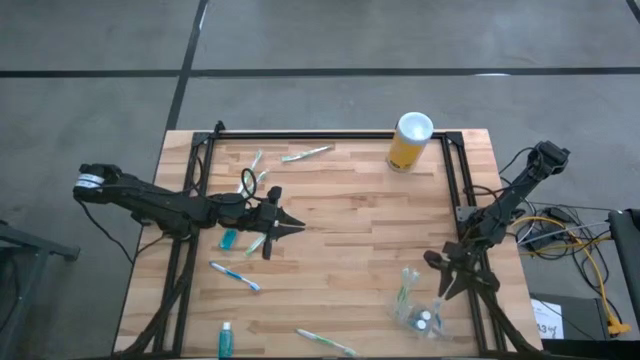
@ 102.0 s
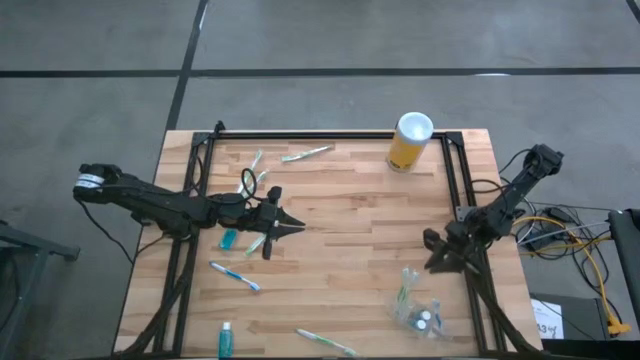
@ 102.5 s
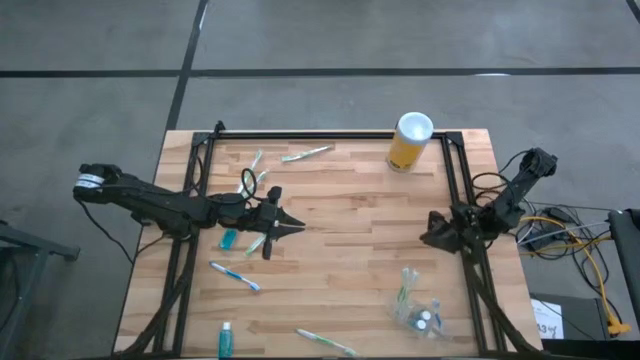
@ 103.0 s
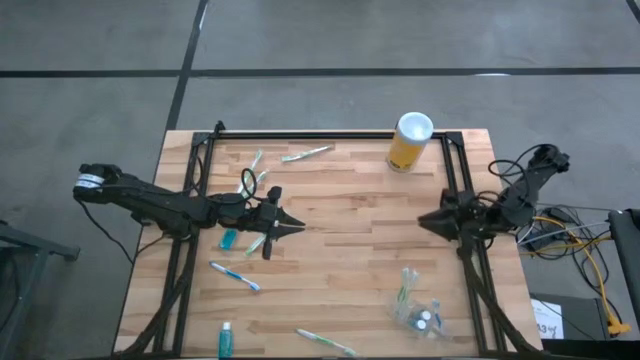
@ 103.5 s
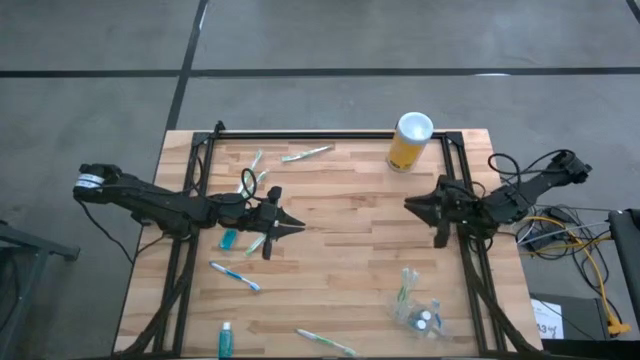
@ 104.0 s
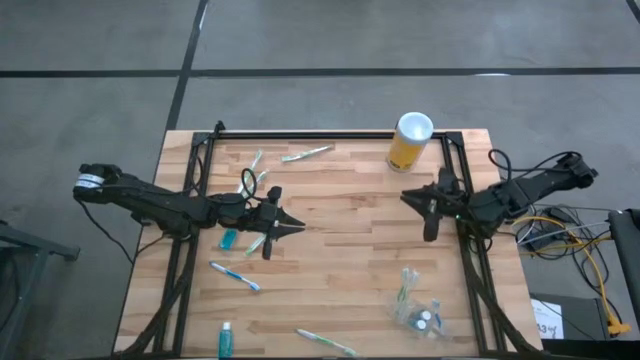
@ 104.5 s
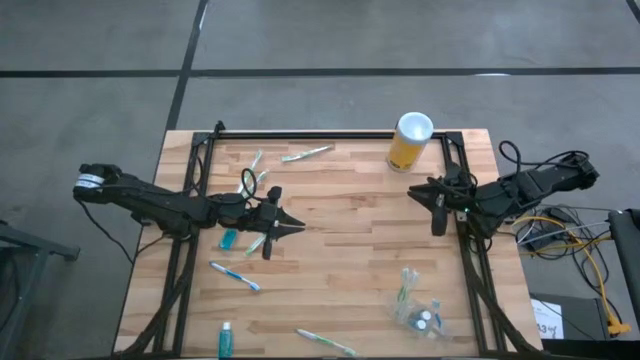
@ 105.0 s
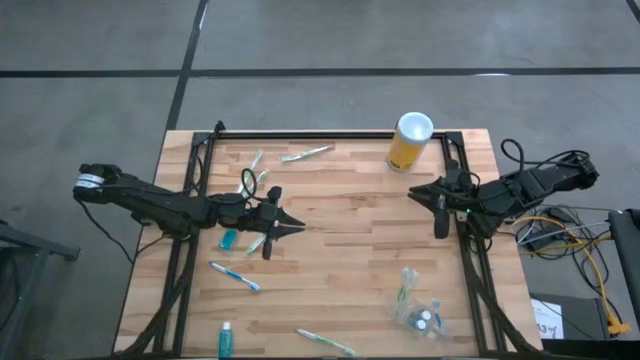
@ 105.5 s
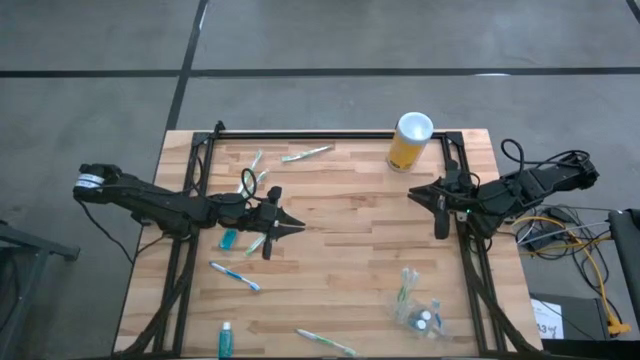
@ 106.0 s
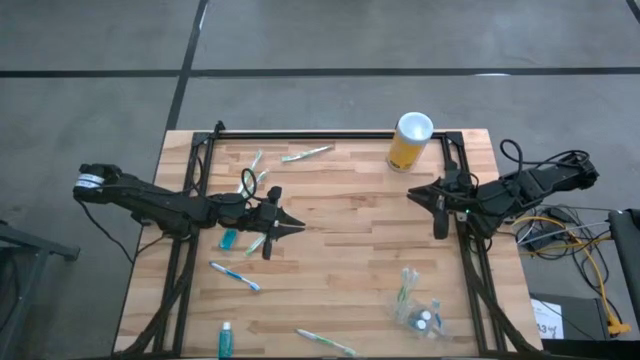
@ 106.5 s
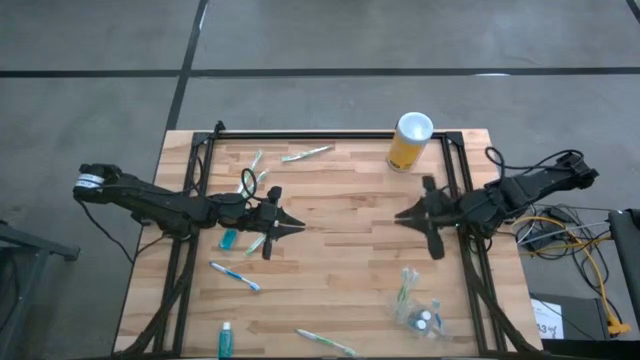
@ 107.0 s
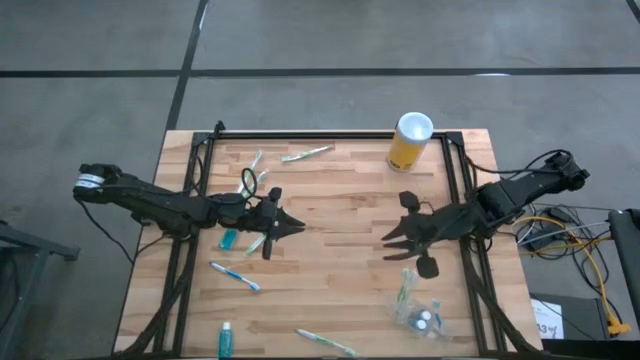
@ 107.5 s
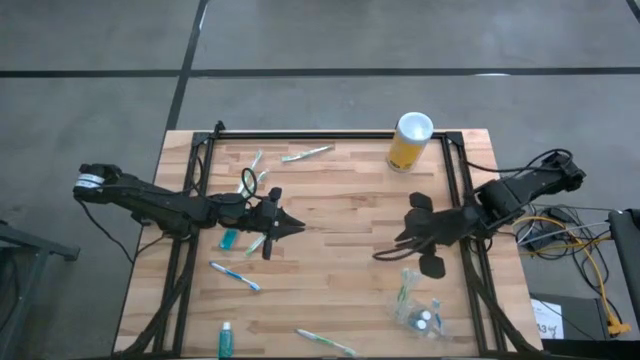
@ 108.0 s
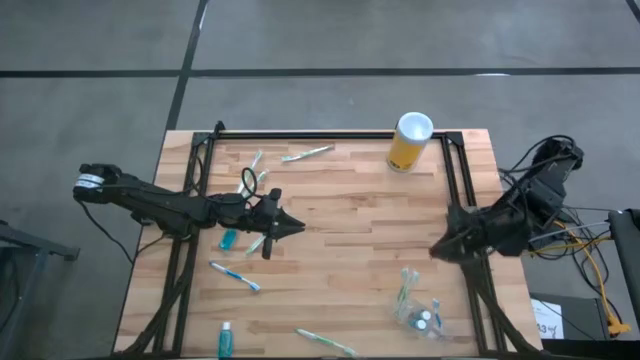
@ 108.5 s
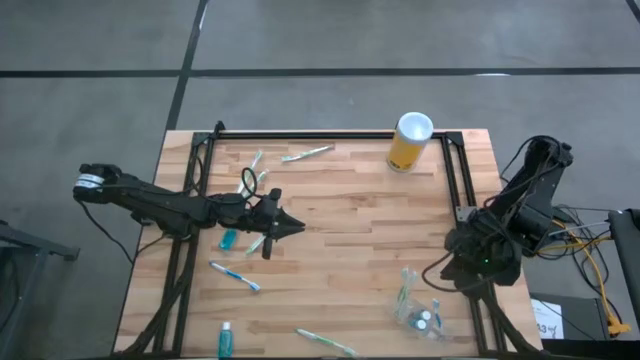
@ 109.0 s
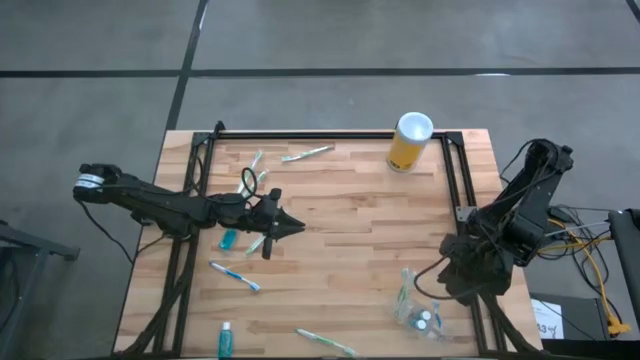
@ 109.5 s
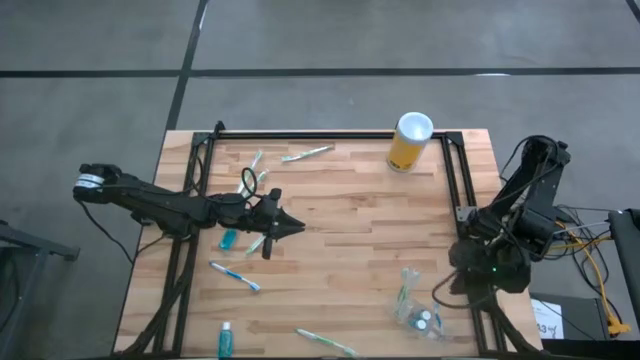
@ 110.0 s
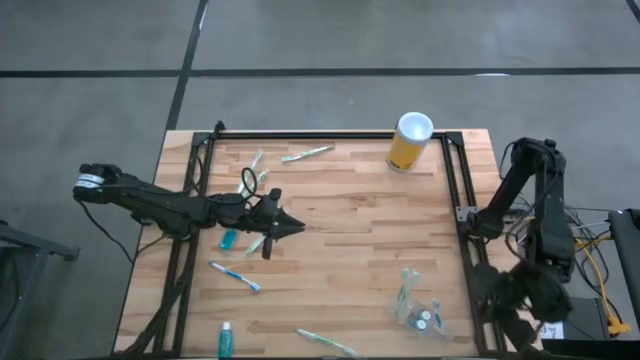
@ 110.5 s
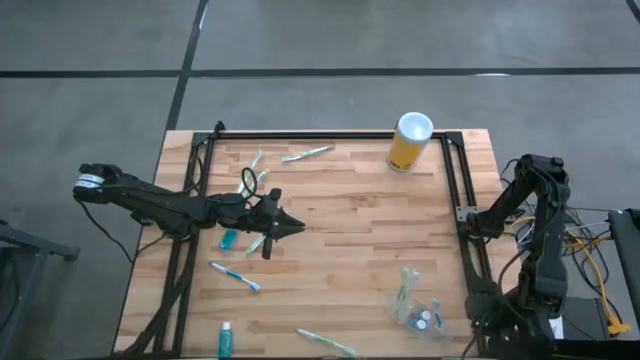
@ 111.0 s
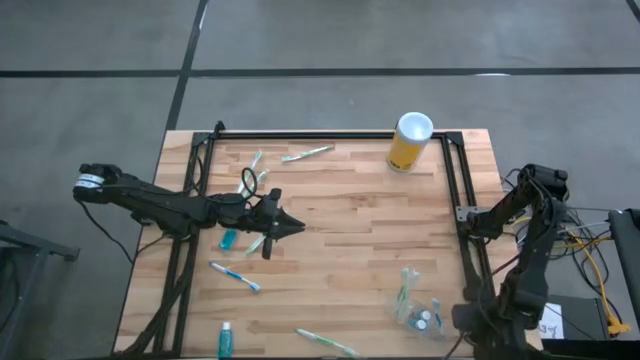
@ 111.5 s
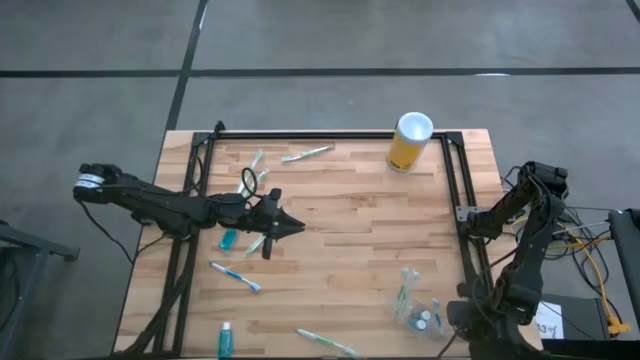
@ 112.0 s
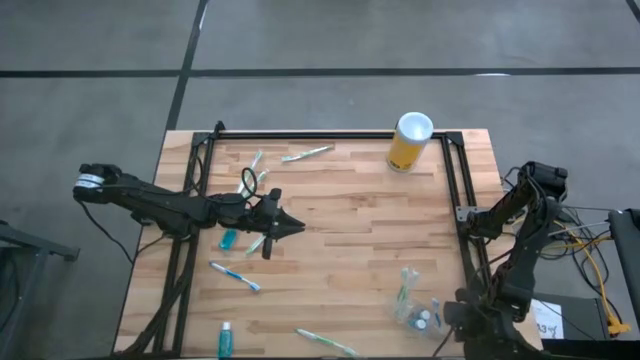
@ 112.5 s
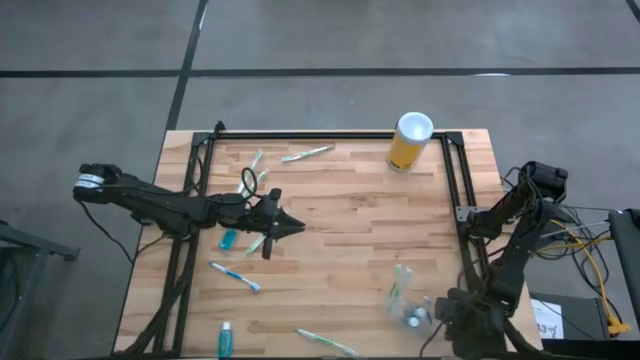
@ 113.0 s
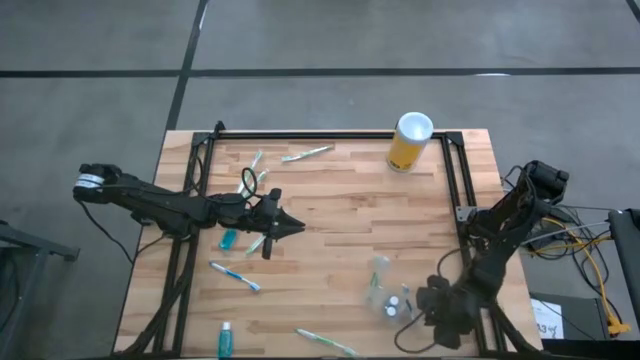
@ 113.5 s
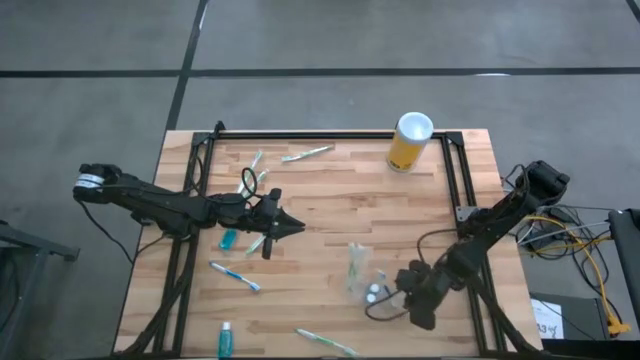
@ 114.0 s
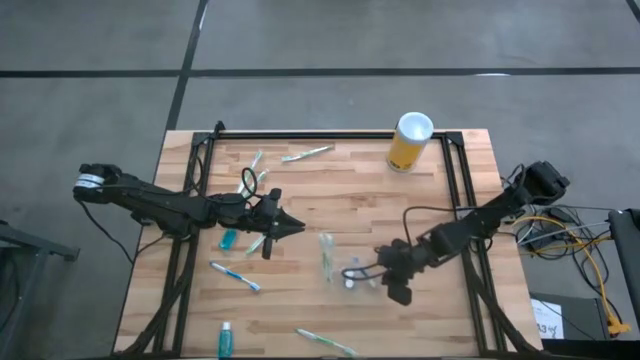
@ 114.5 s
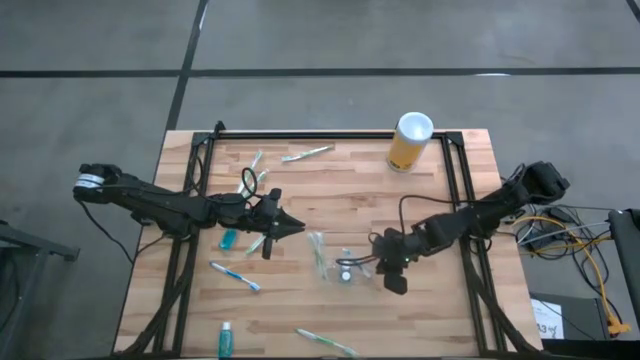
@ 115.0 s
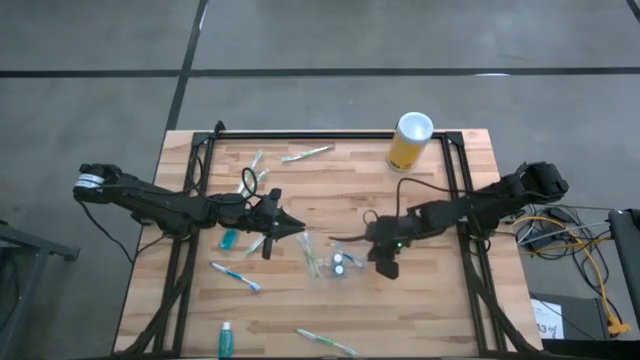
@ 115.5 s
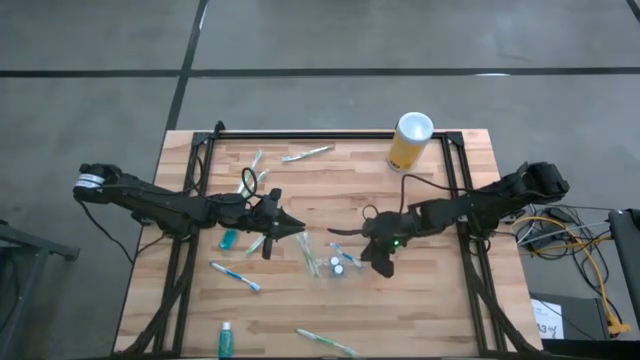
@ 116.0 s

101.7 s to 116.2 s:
Task: Pick & Place toothbrushing station
Move the transparent organizer to the center of the table

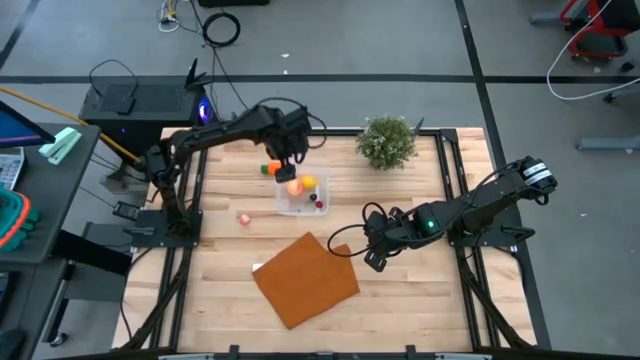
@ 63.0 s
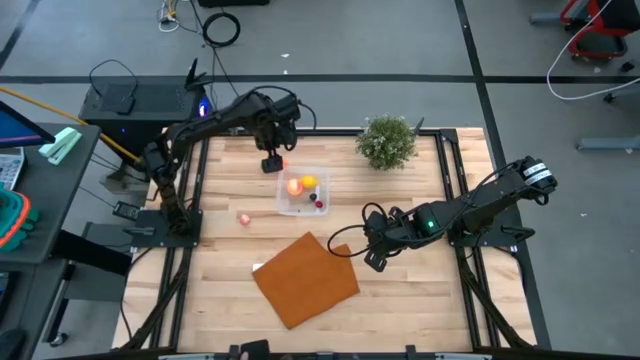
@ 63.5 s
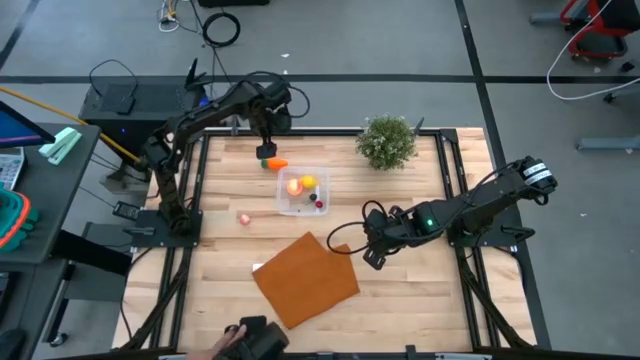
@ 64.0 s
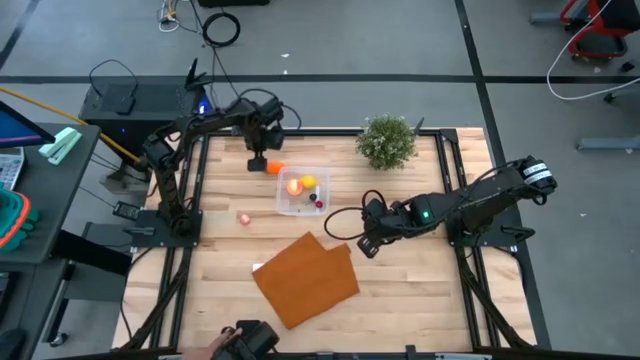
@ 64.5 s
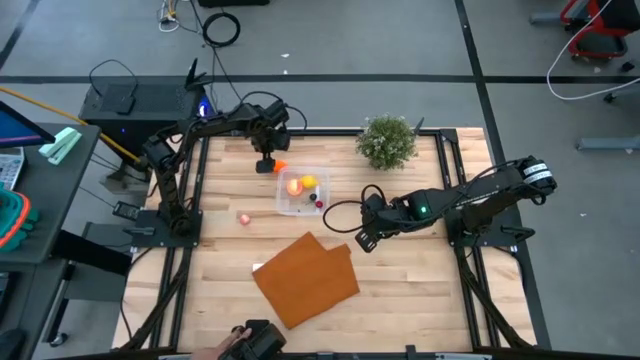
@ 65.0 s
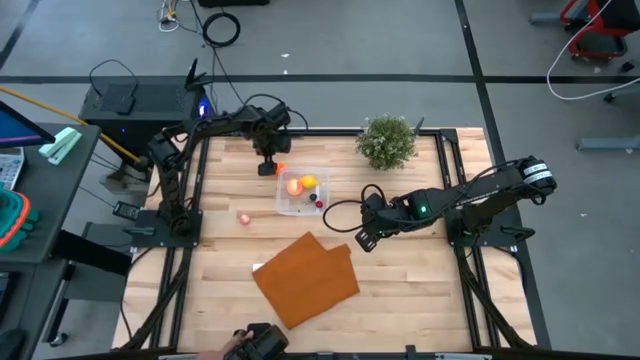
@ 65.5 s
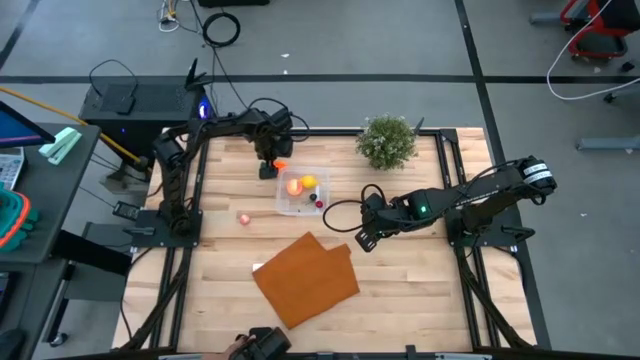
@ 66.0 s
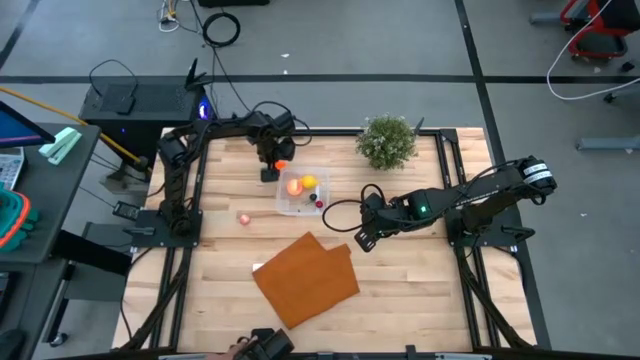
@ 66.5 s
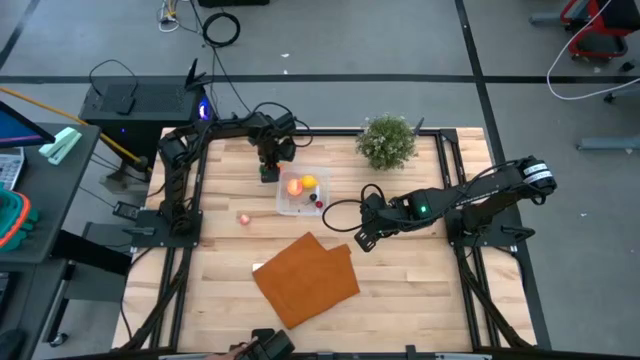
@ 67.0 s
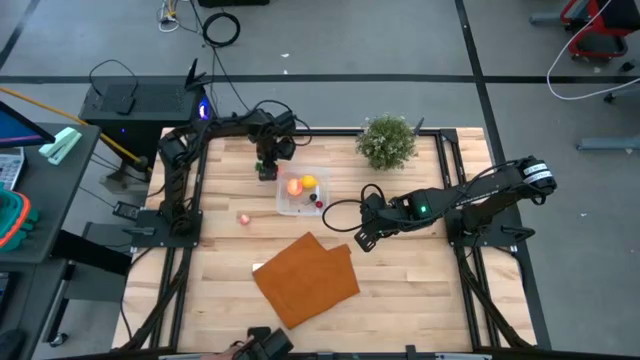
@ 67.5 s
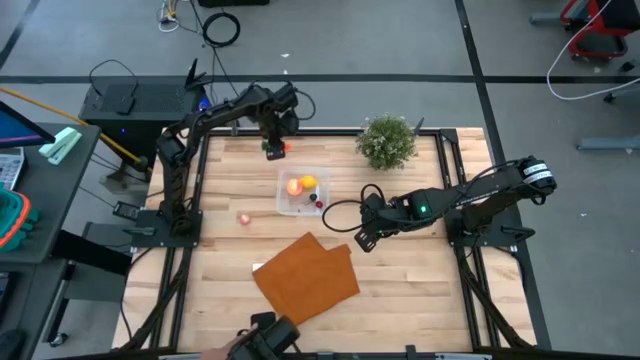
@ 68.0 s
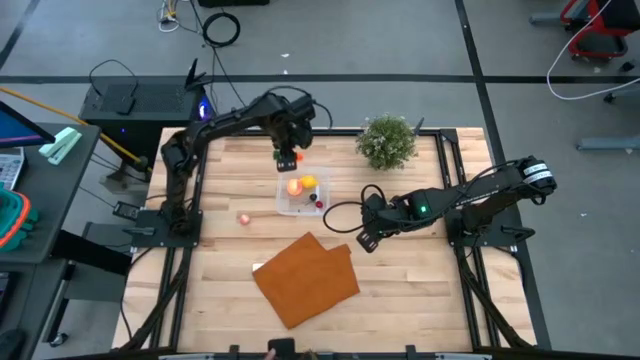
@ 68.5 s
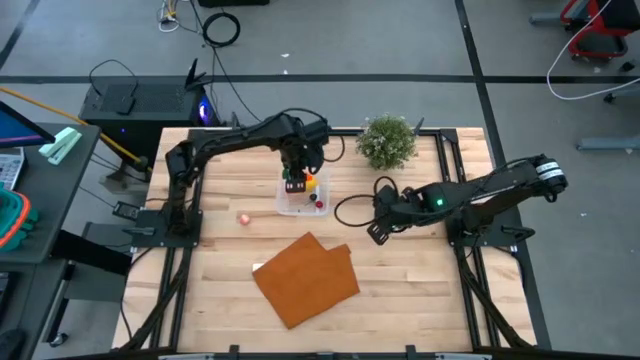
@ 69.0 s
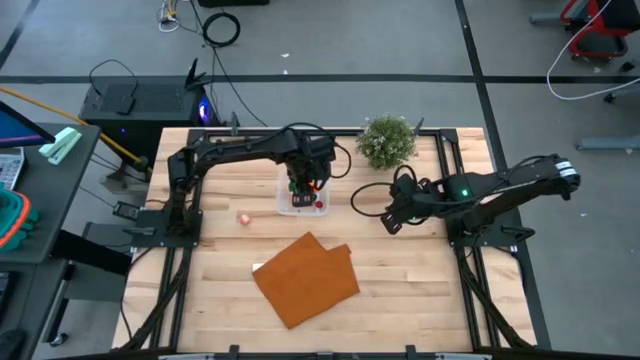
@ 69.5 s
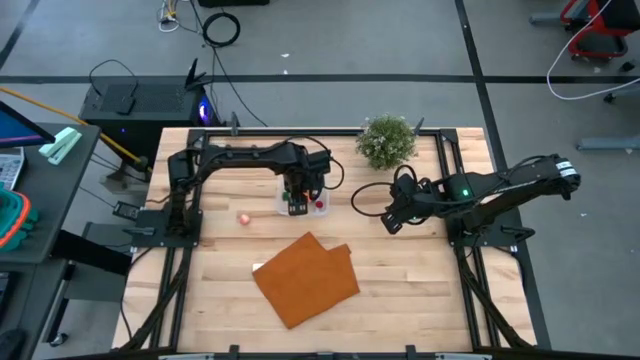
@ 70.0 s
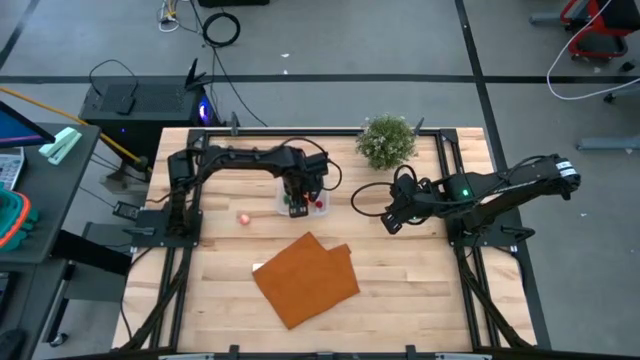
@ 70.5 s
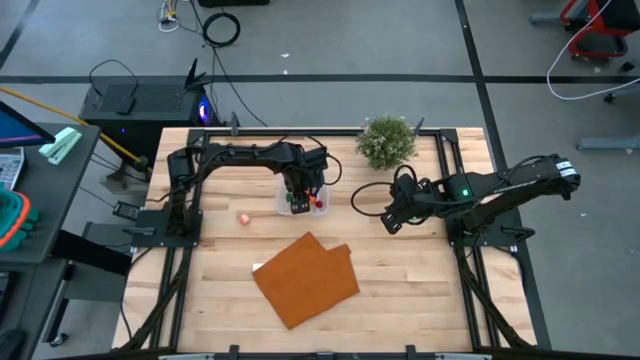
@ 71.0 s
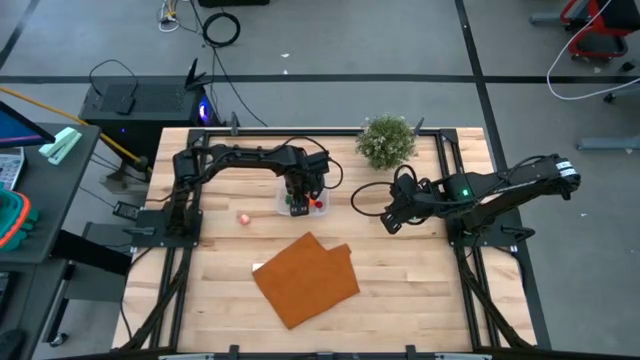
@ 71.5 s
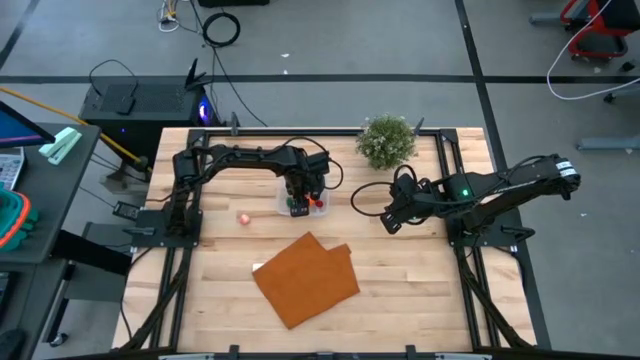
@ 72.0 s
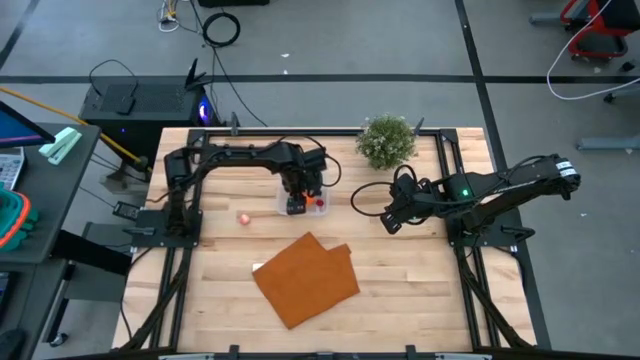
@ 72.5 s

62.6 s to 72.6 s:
Task: Pick and placing Produce into tupperware
Put the orange carrot into the transparent bin
